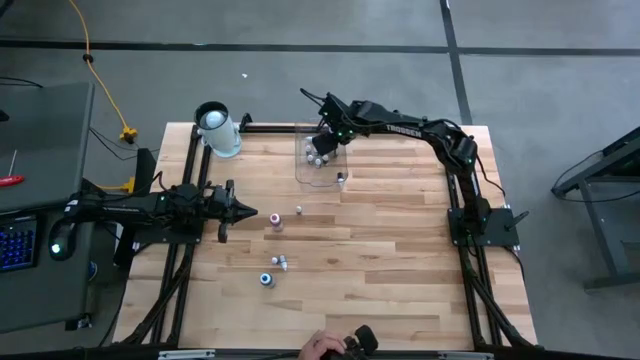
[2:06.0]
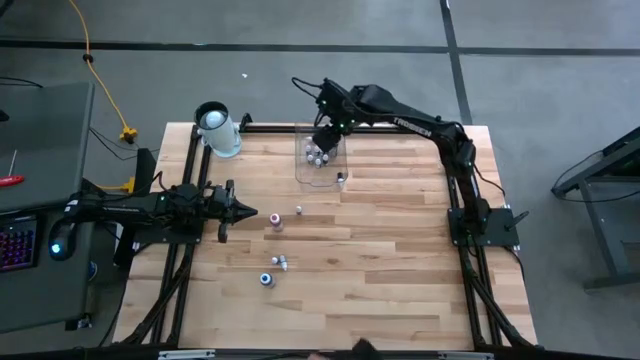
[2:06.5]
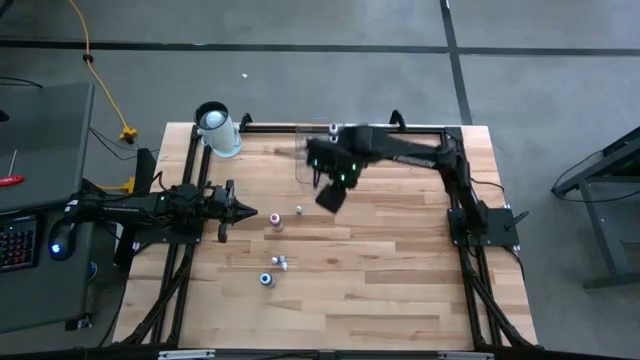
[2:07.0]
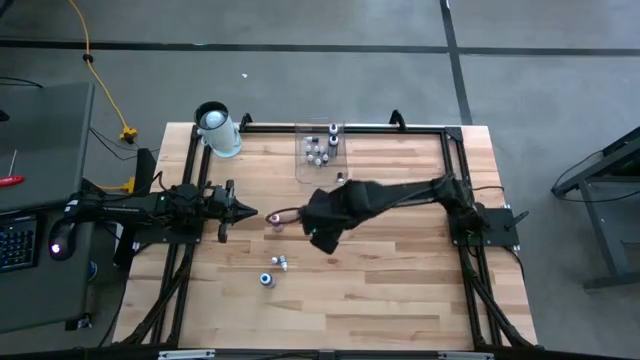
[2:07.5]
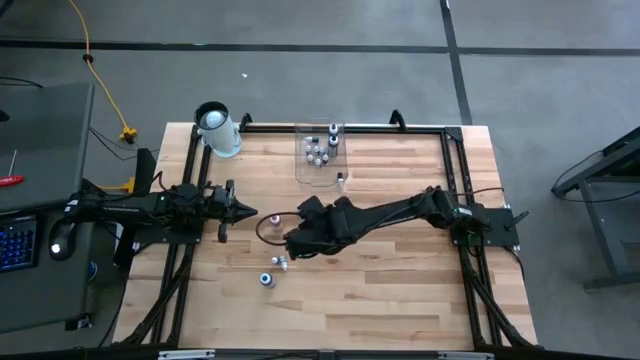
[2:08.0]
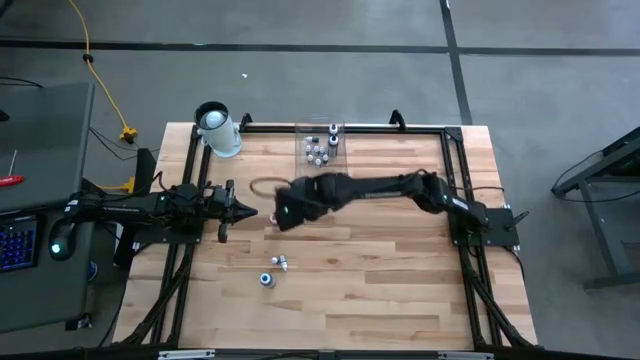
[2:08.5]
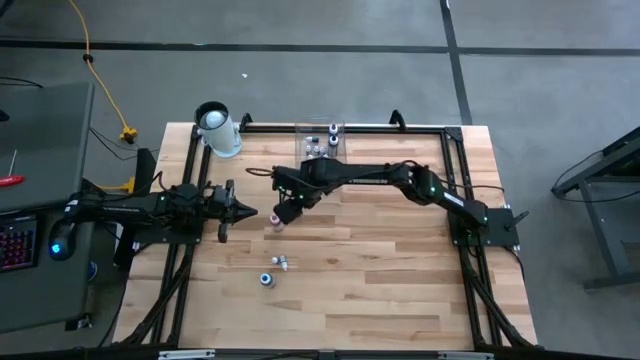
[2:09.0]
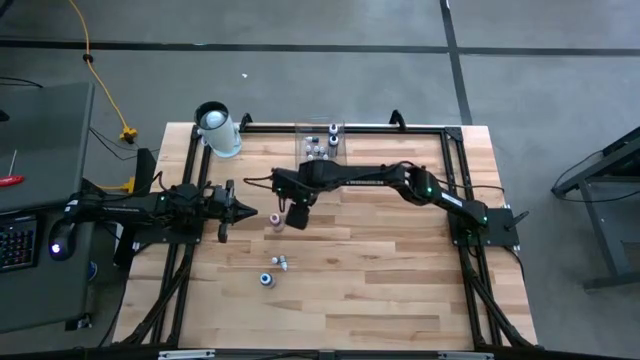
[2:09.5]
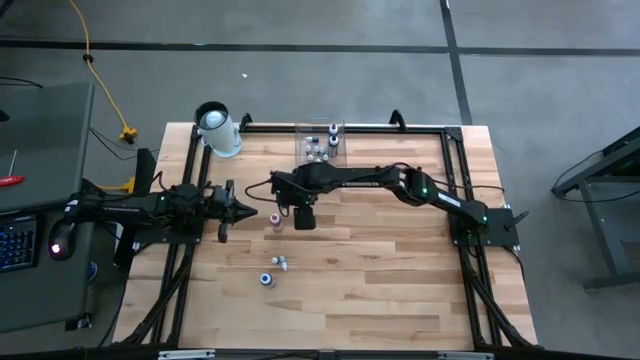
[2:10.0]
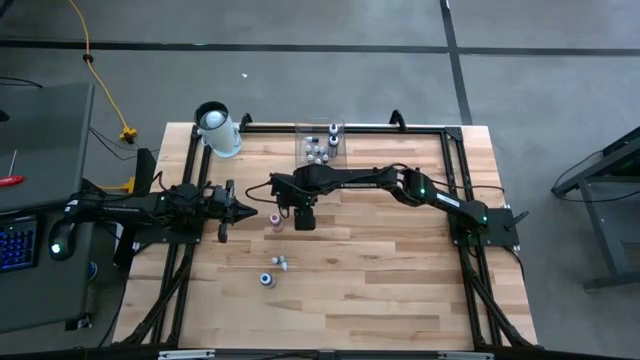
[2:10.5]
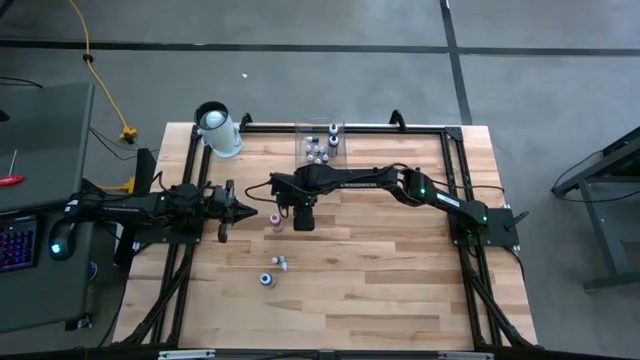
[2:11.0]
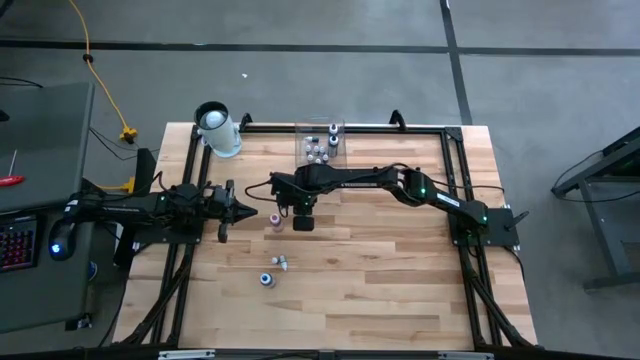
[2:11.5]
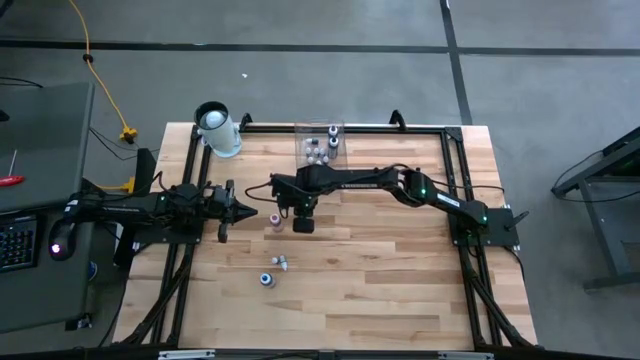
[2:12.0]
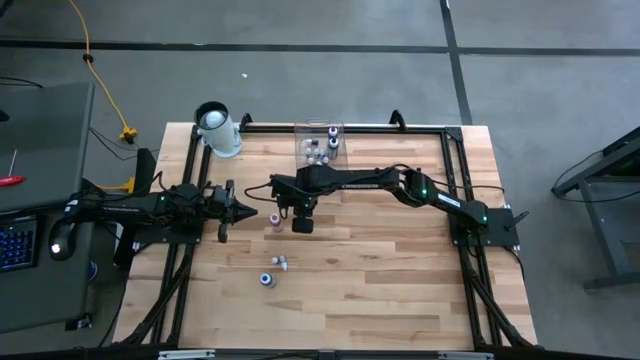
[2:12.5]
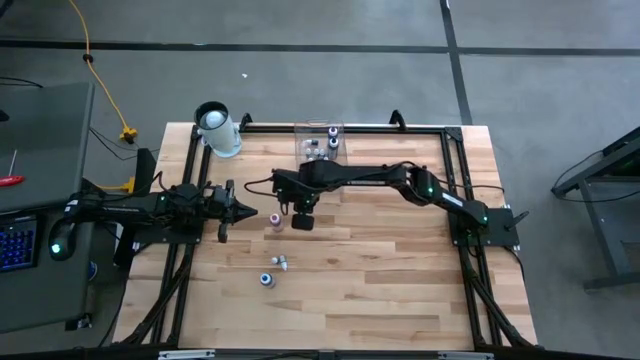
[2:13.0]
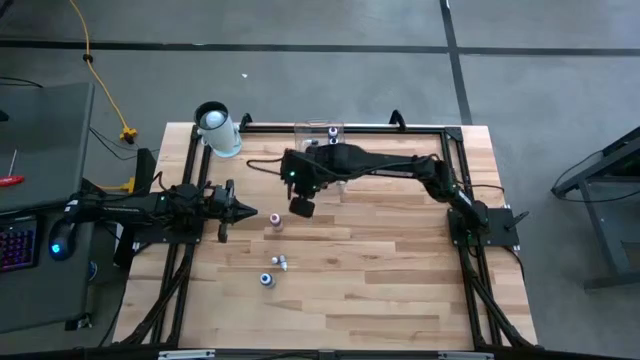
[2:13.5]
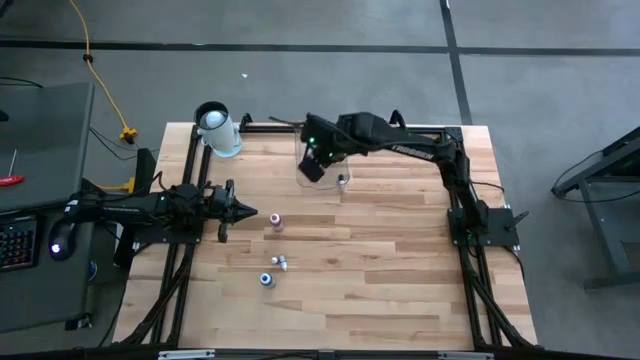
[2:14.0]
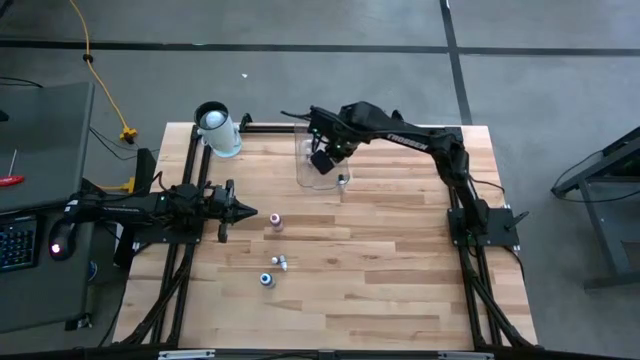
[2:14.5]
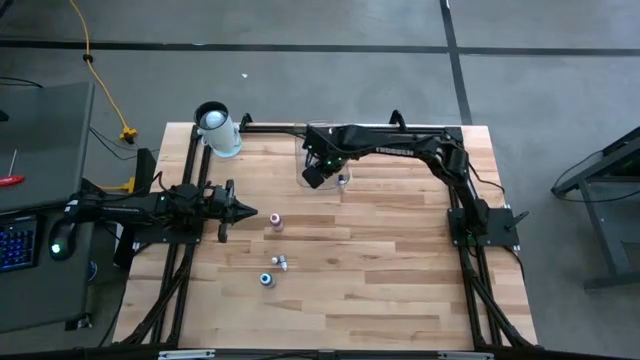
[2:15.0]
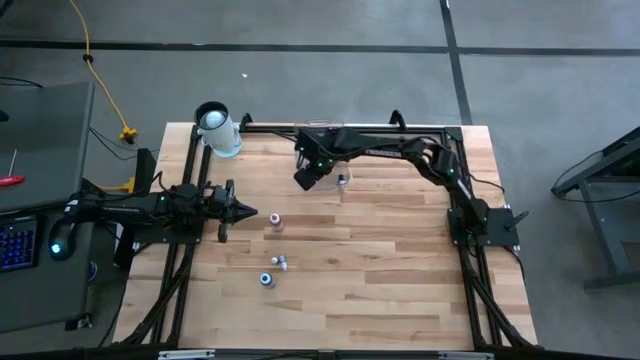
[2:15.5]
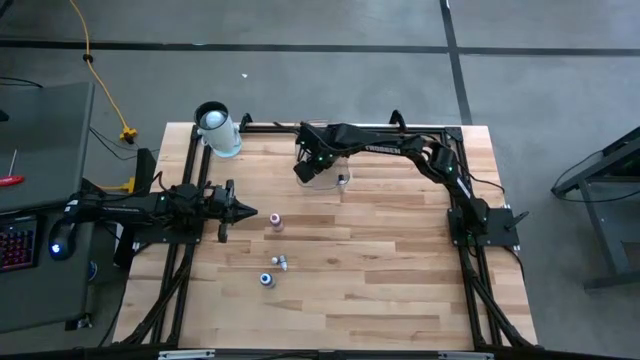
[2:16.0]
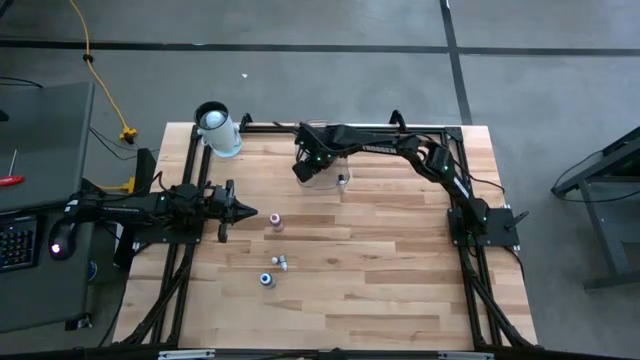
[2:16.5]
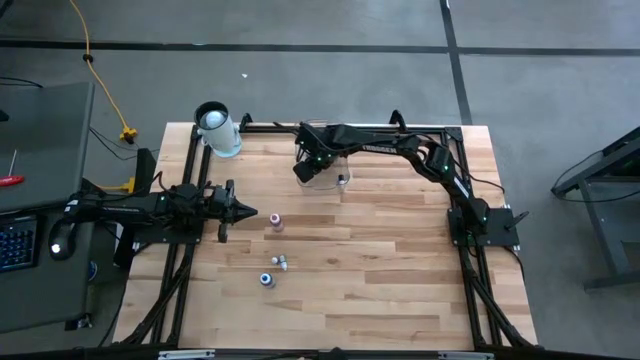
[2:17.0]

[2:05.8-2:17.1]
Task: Pick & Place food coloring
Put the small red food coloring bottle into the container

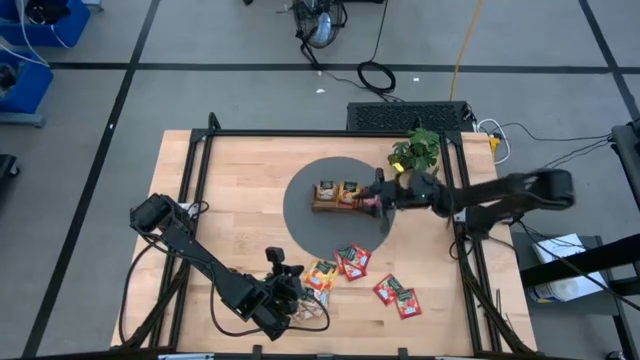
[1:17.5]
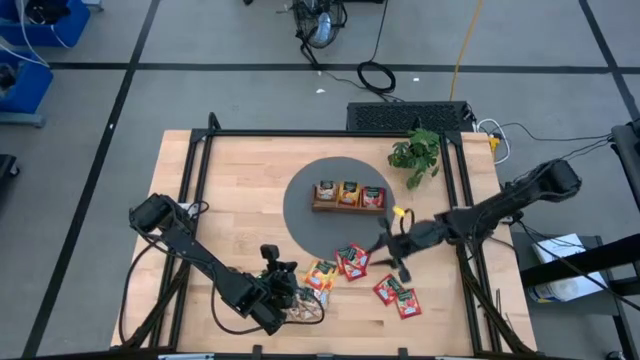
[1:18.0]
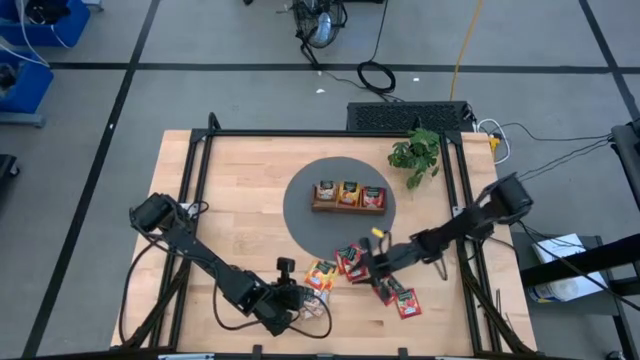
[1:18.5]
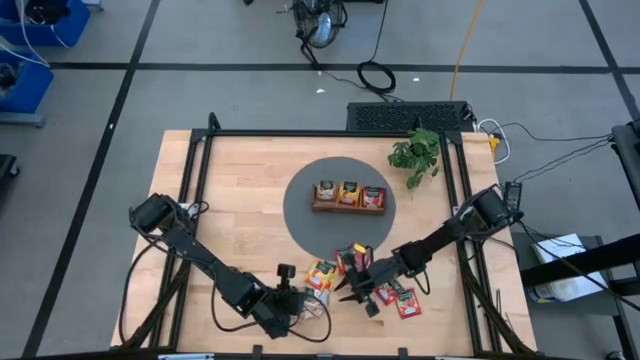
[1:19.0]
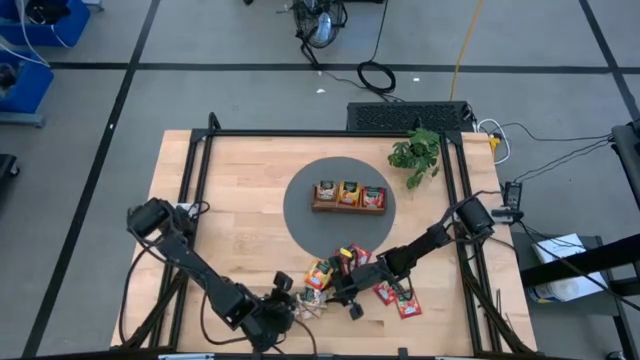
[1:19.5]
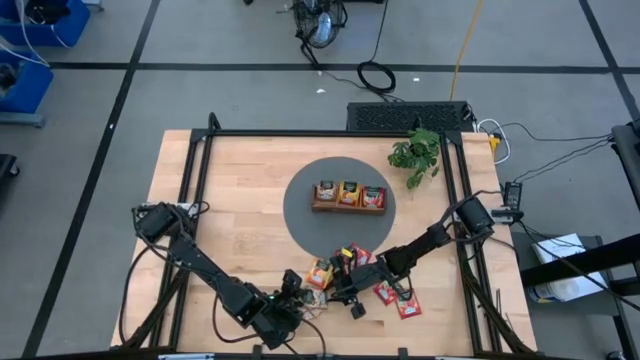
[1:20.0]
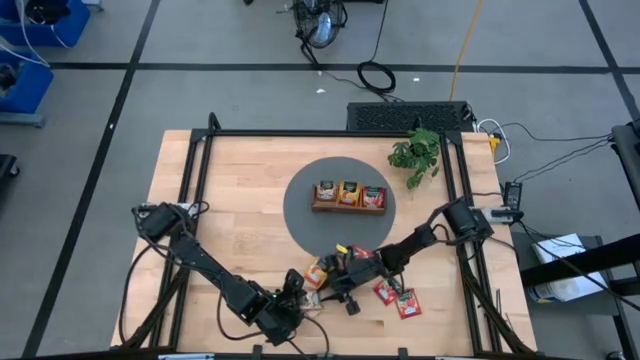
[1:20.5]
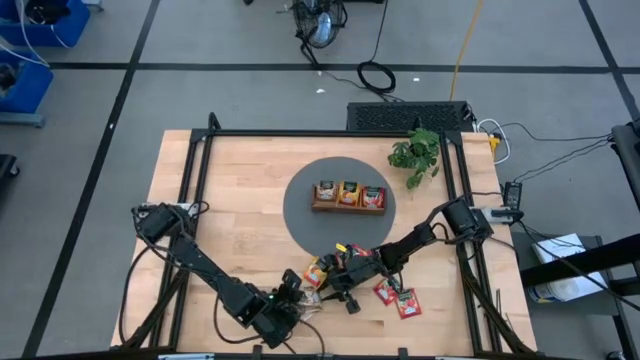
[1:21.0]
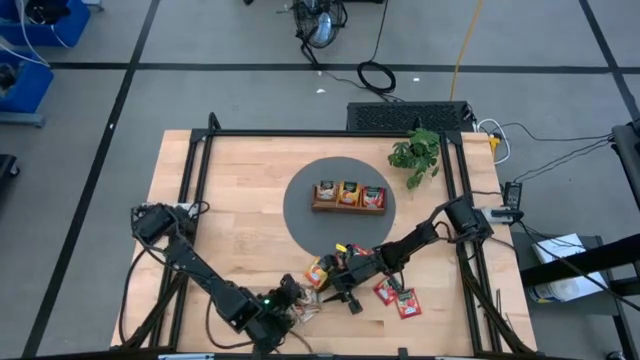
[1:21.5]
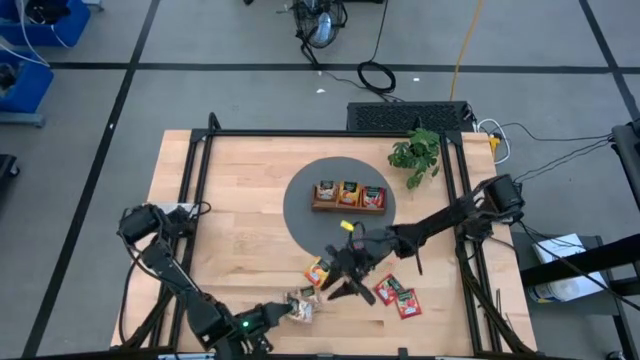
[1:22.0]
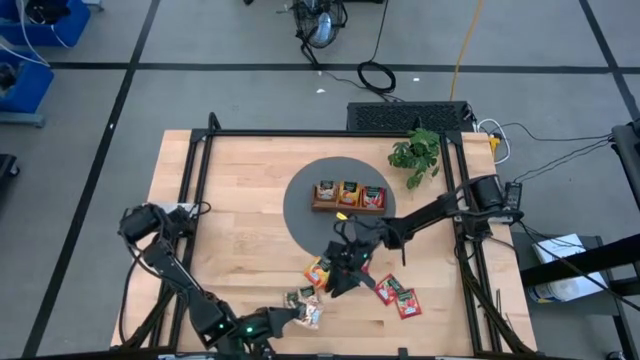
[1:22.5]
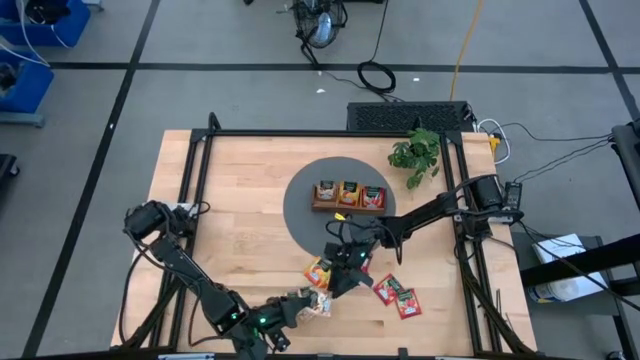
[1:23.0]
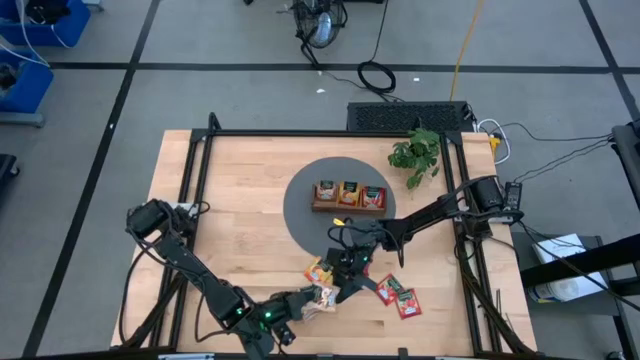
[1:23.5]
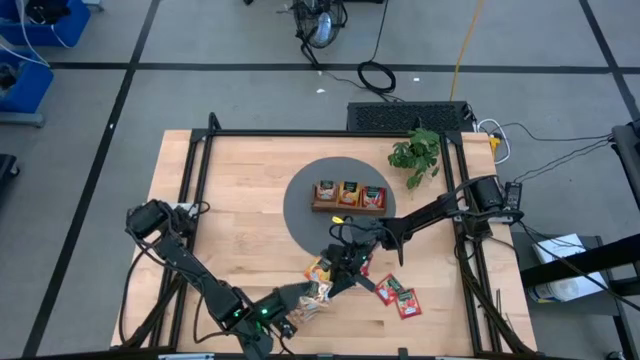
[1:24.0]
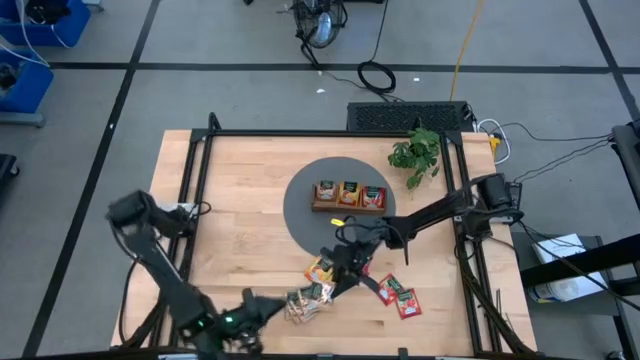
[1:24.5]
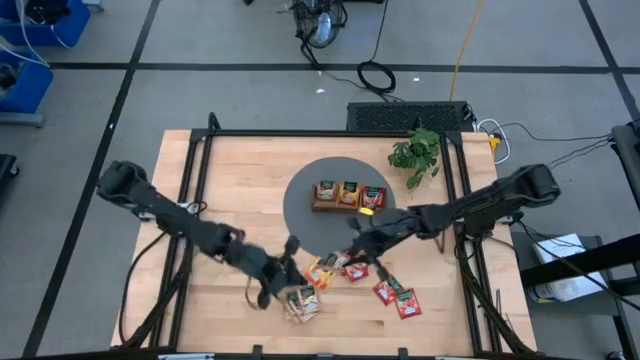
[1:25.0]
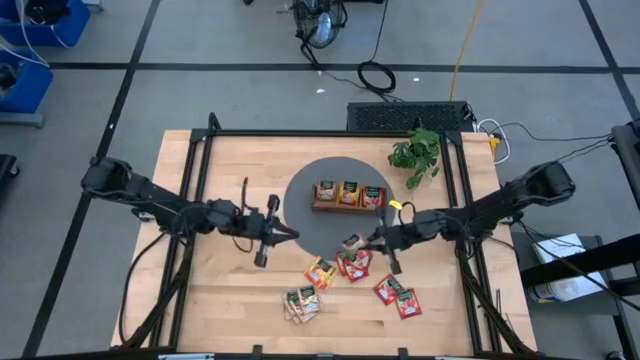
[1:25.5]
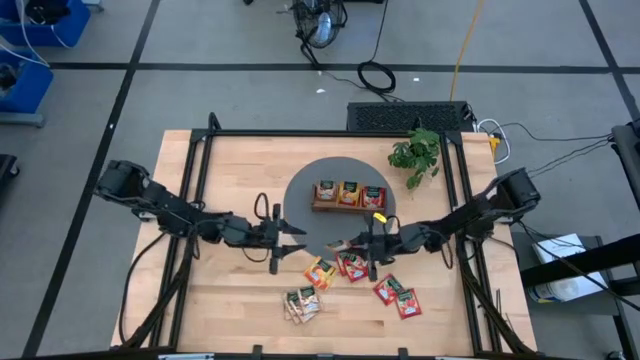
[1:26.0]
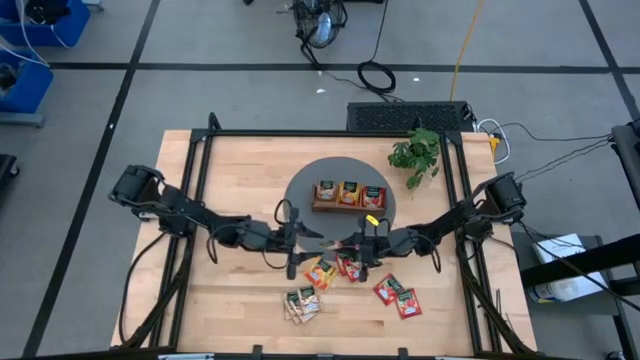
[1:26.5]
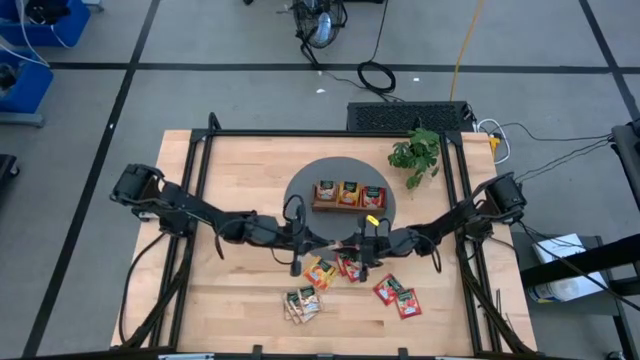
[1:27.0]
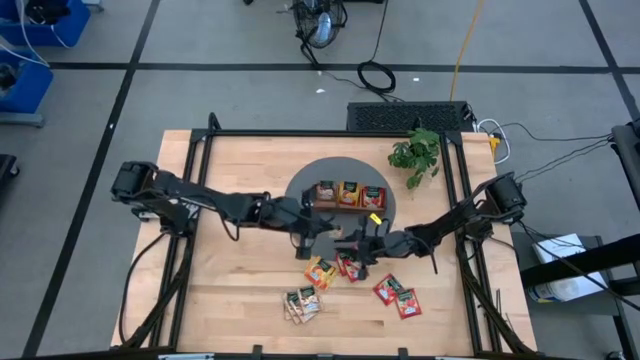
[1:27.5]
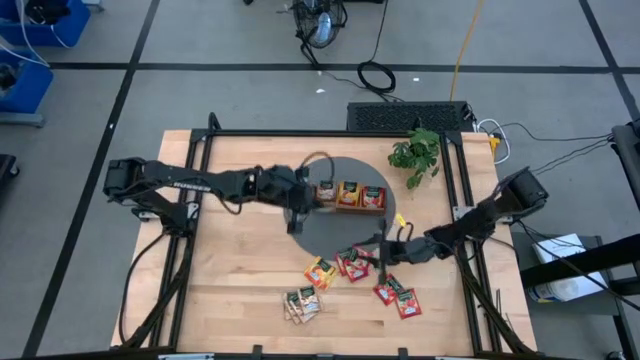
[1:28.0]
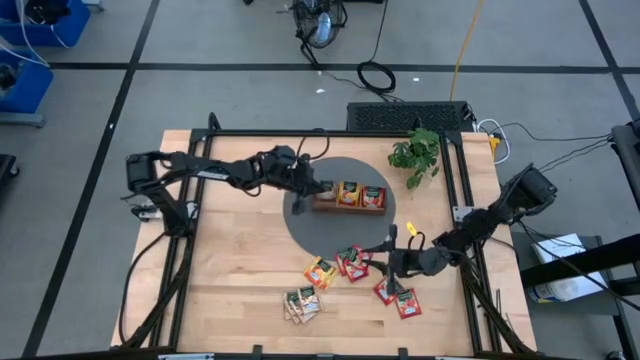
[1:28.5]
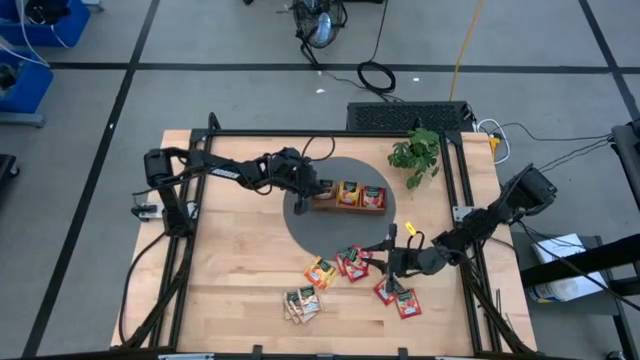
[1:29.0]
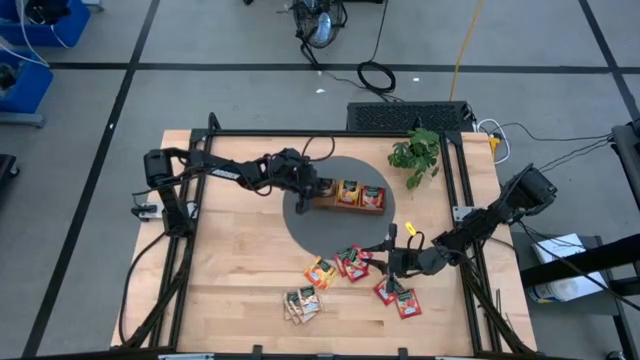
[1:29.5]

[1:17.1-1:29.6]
Task: Pick & Place Tea
Put the brown tea bag to the left section into the wooden organizer
